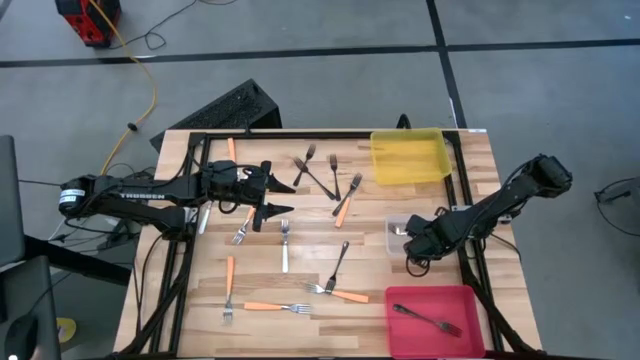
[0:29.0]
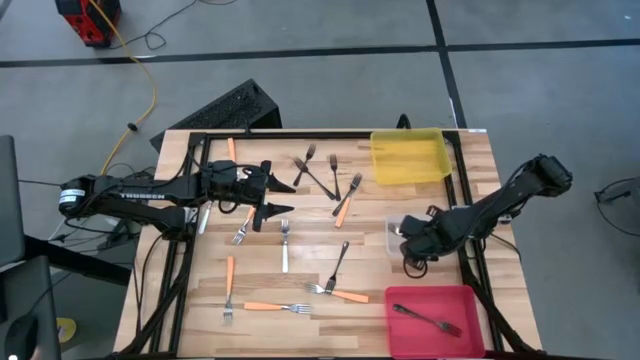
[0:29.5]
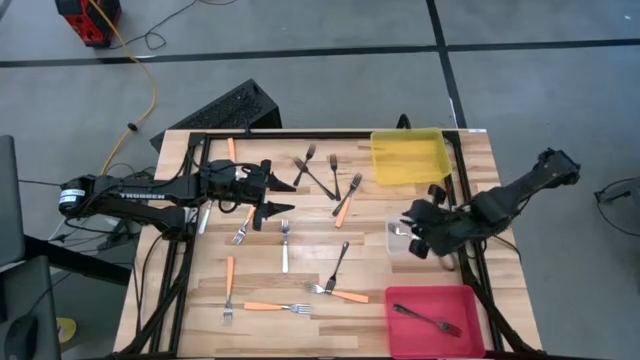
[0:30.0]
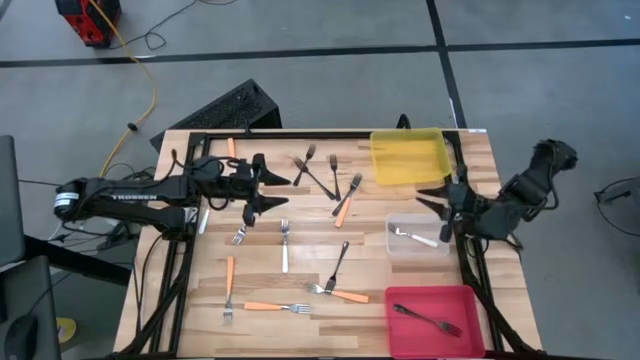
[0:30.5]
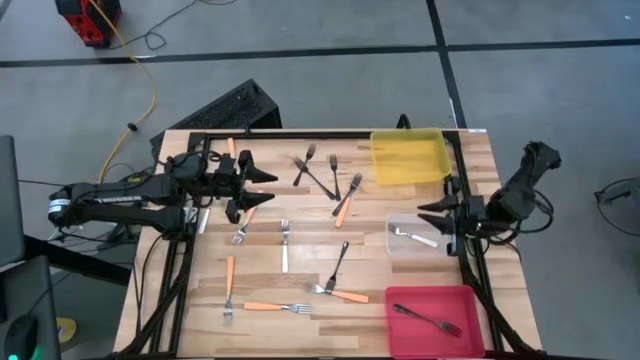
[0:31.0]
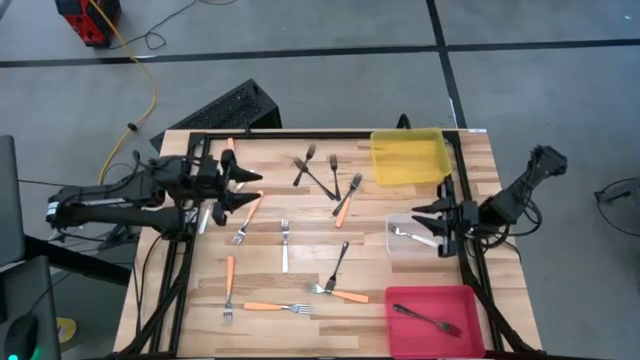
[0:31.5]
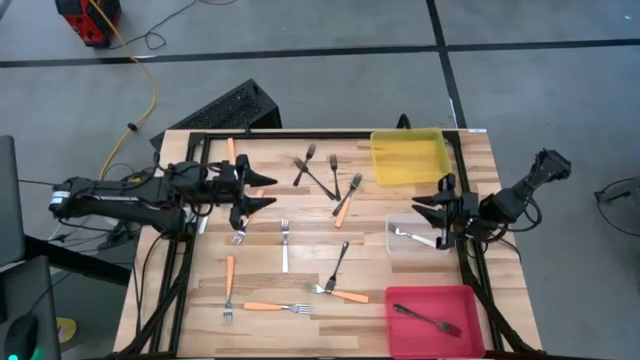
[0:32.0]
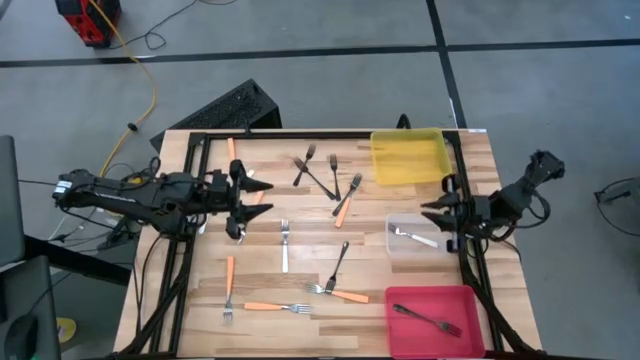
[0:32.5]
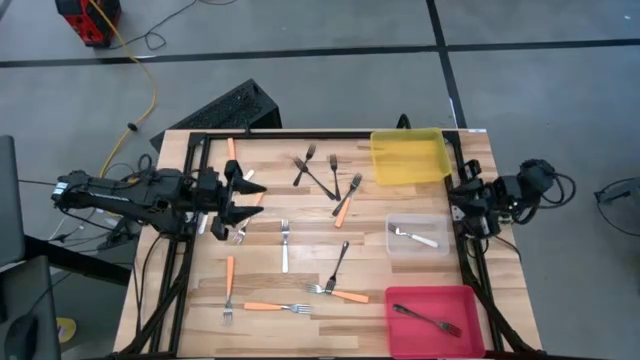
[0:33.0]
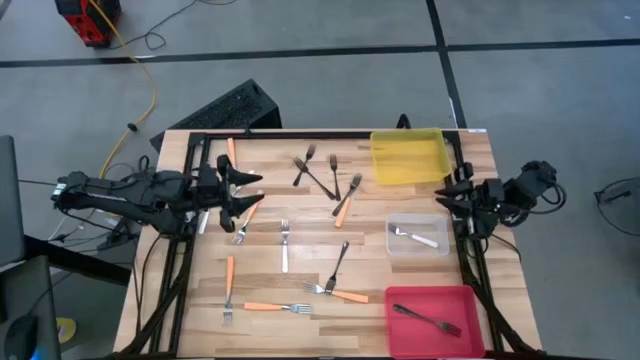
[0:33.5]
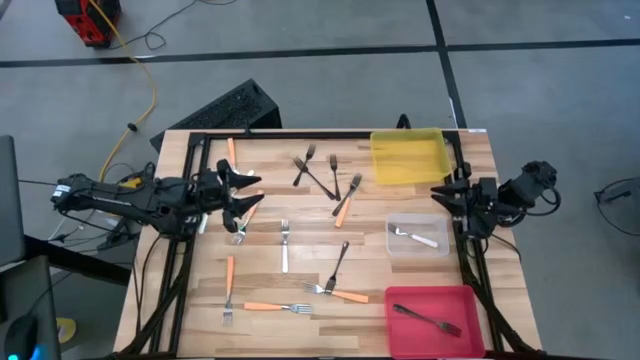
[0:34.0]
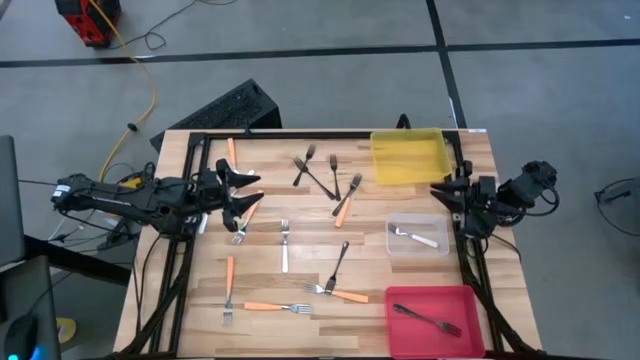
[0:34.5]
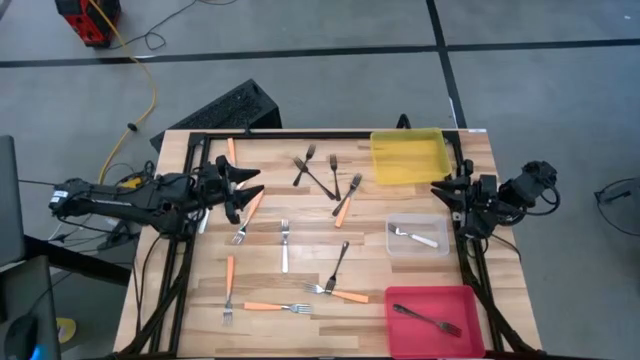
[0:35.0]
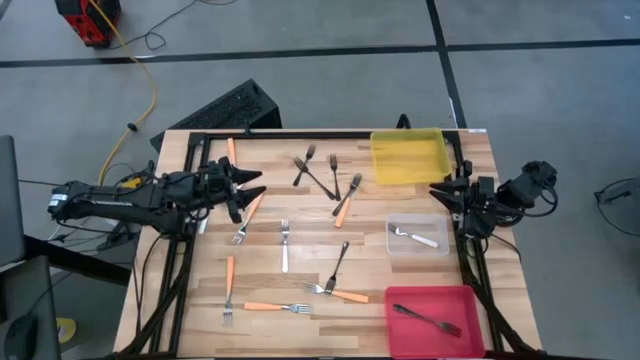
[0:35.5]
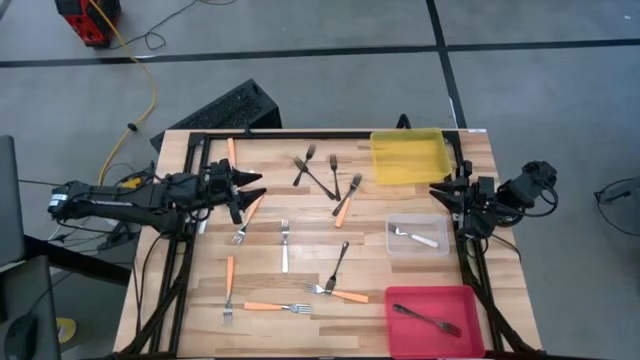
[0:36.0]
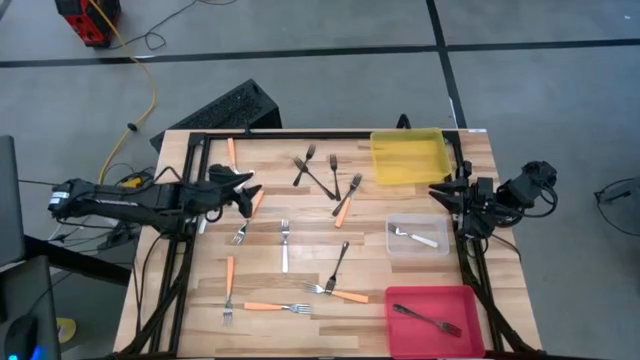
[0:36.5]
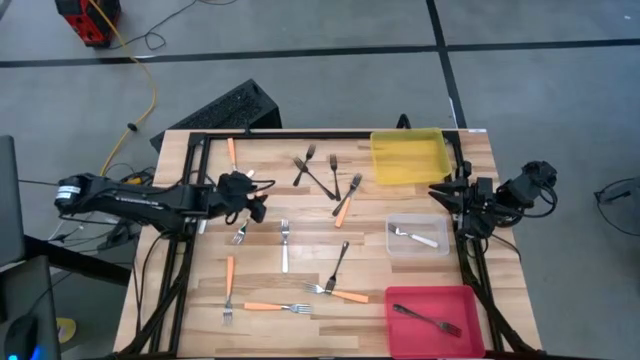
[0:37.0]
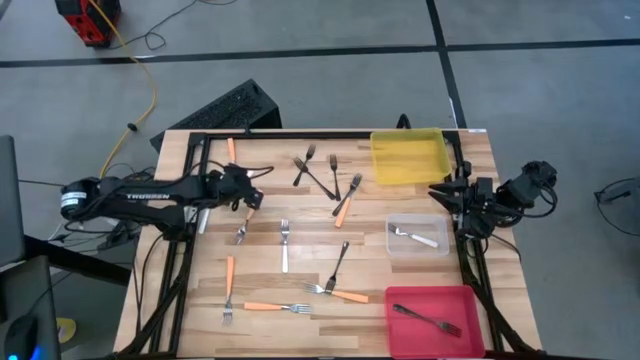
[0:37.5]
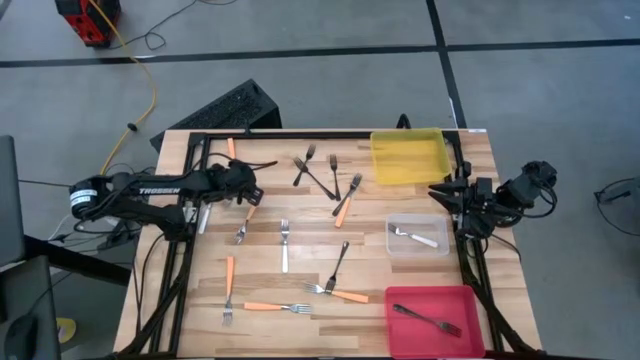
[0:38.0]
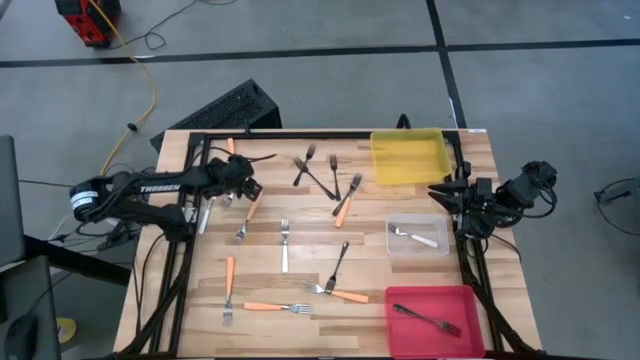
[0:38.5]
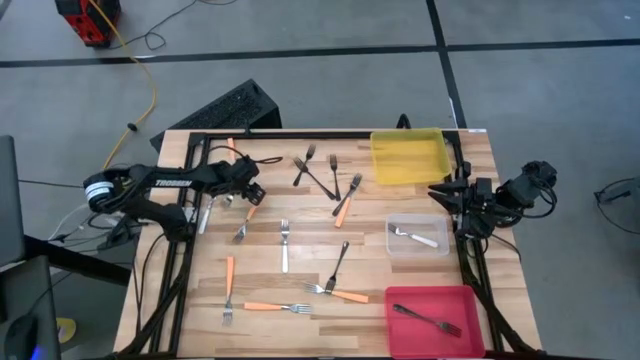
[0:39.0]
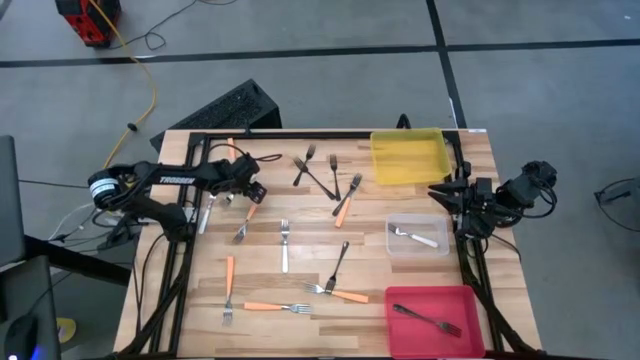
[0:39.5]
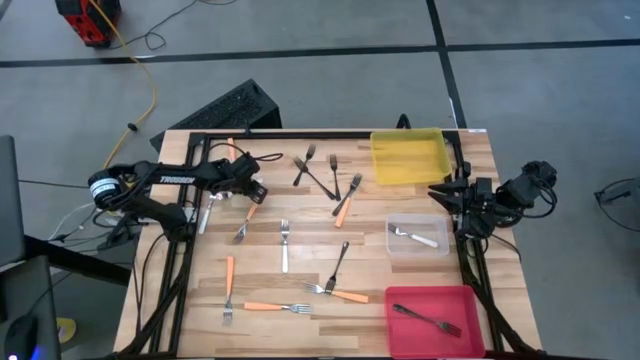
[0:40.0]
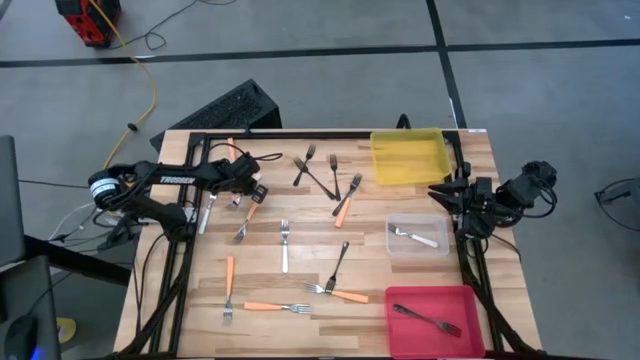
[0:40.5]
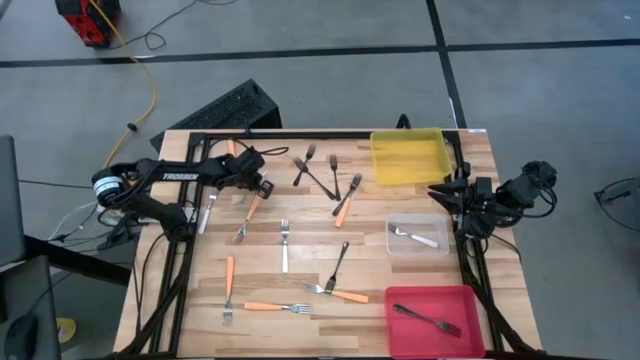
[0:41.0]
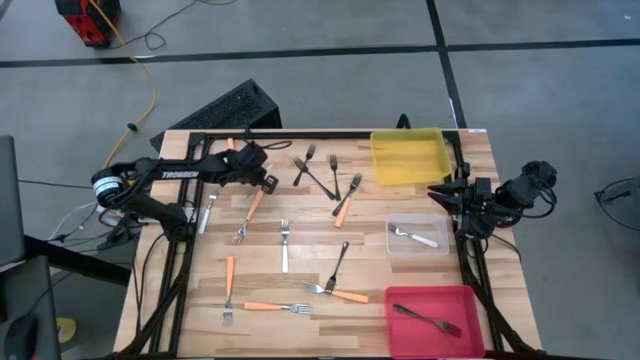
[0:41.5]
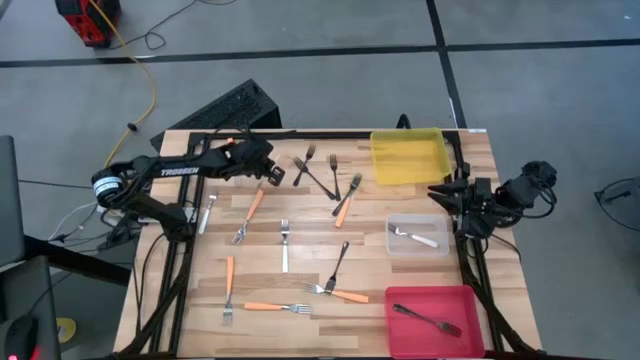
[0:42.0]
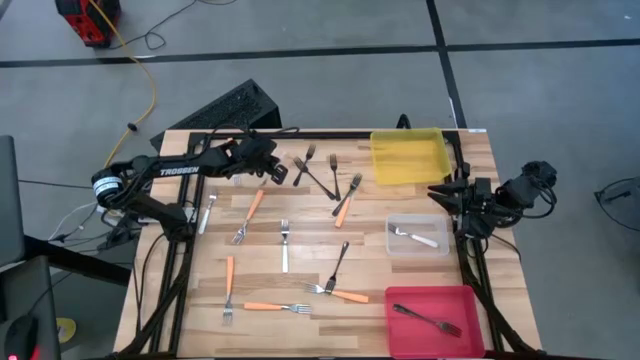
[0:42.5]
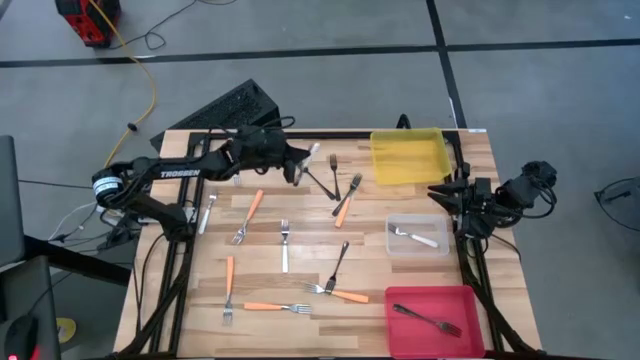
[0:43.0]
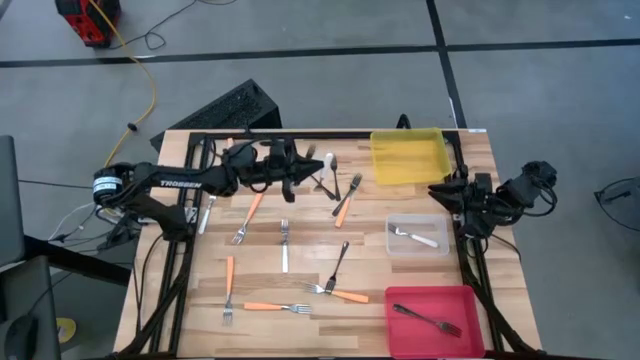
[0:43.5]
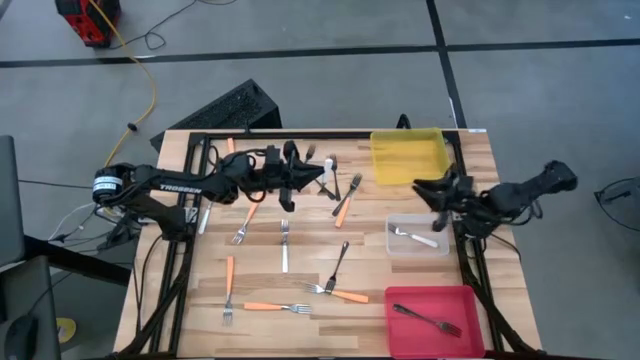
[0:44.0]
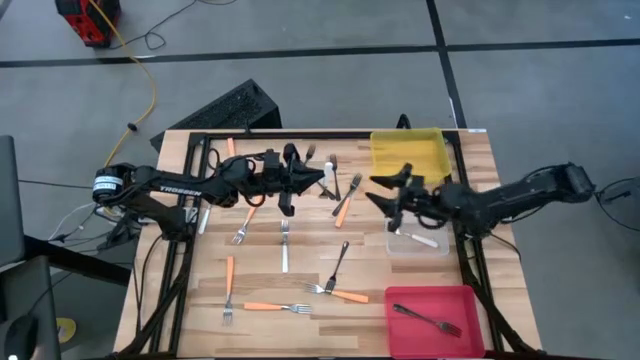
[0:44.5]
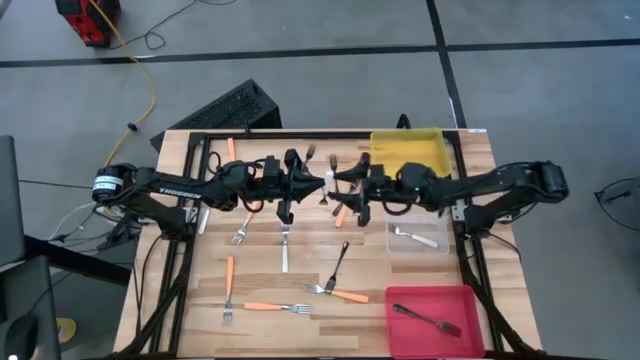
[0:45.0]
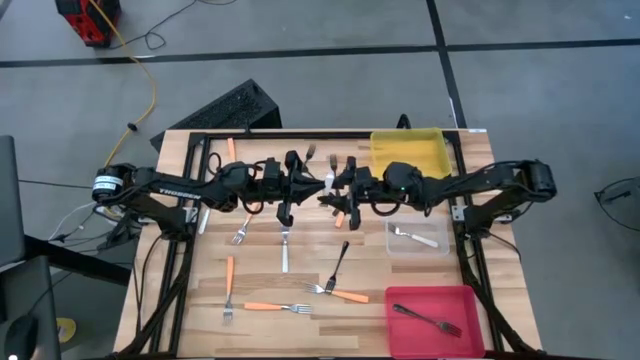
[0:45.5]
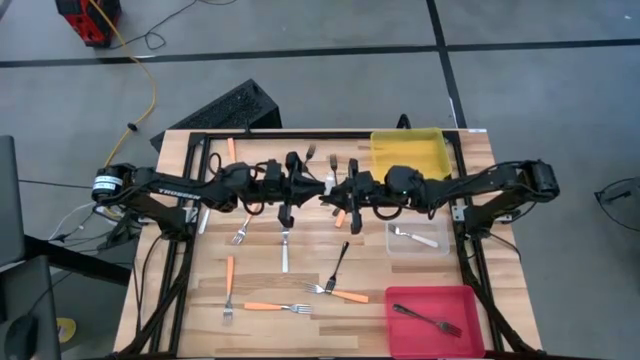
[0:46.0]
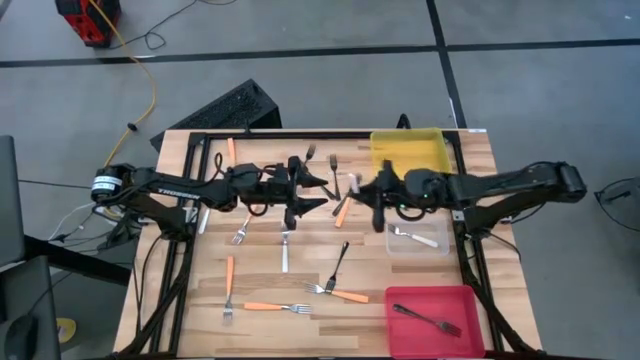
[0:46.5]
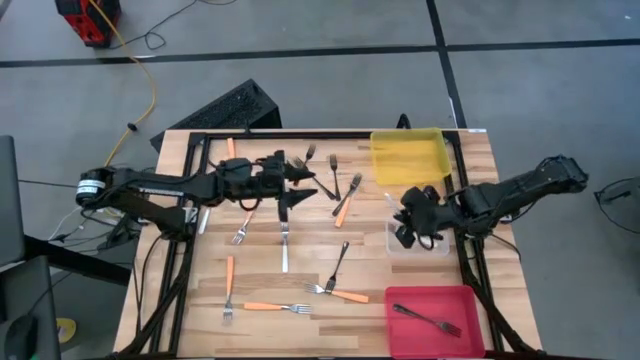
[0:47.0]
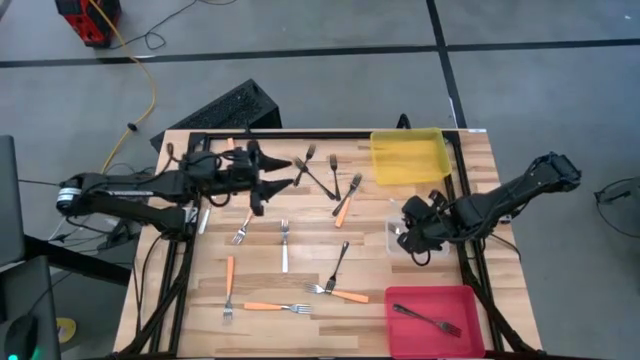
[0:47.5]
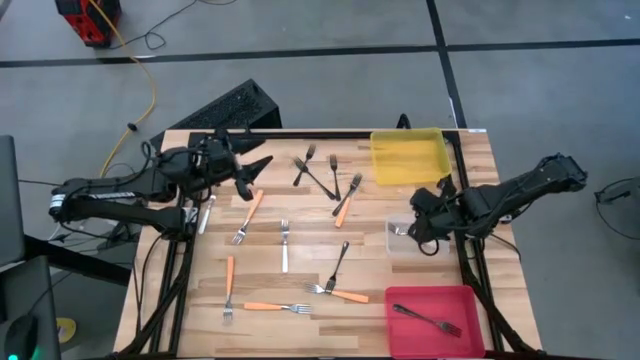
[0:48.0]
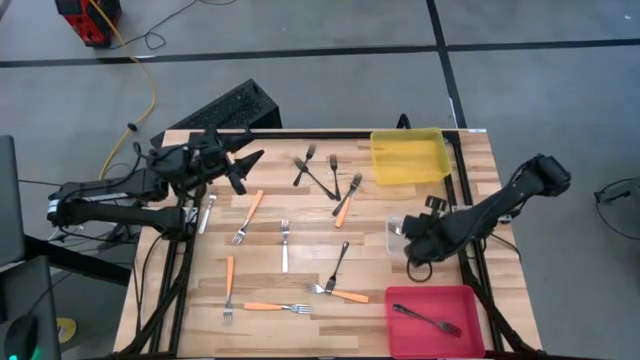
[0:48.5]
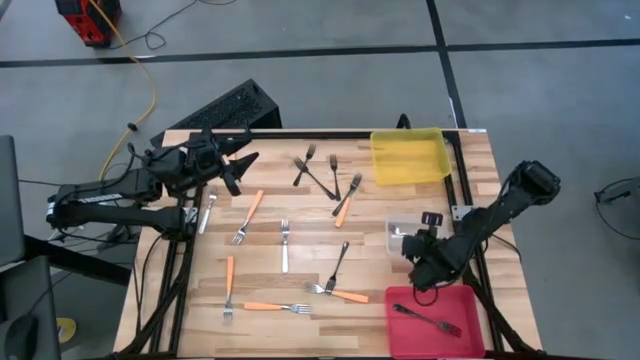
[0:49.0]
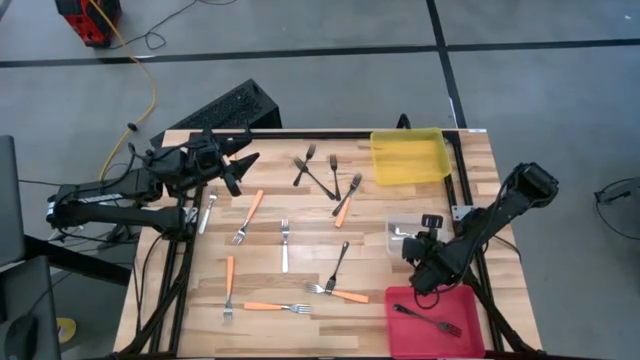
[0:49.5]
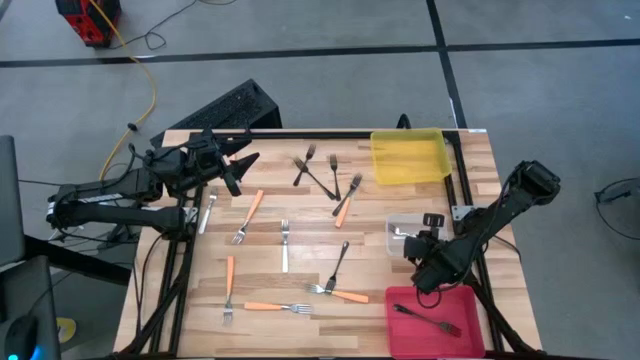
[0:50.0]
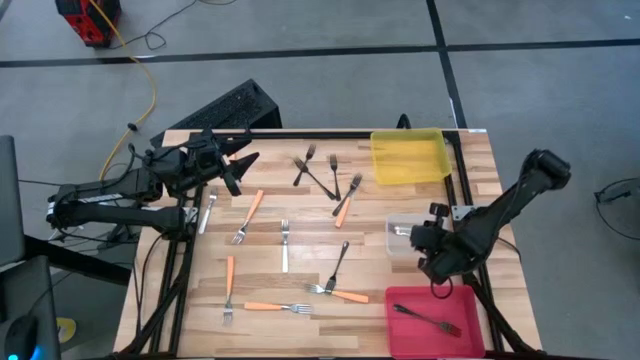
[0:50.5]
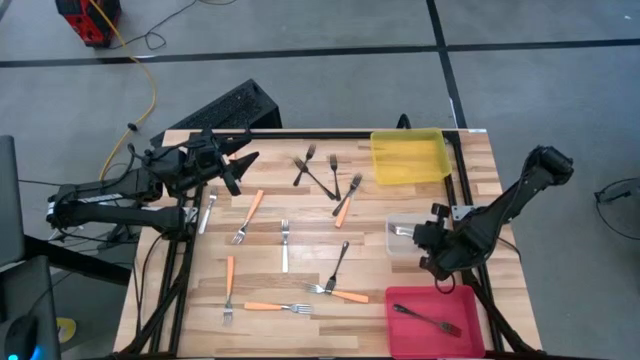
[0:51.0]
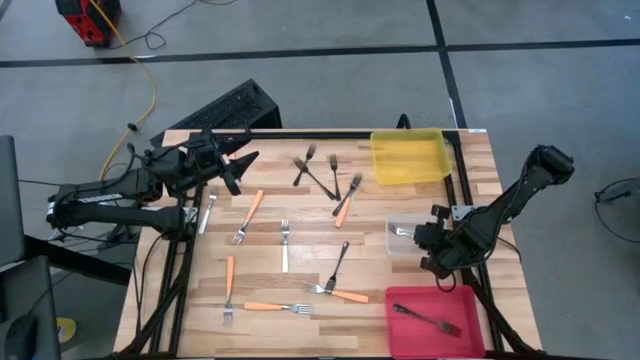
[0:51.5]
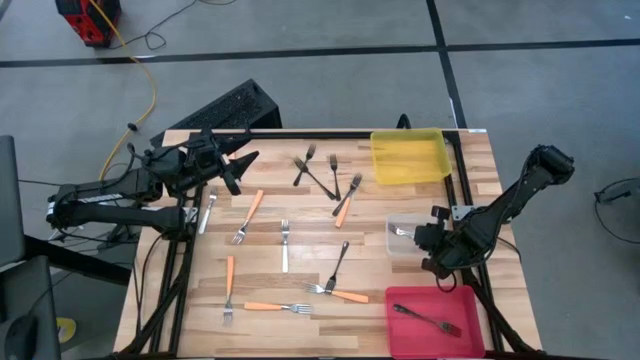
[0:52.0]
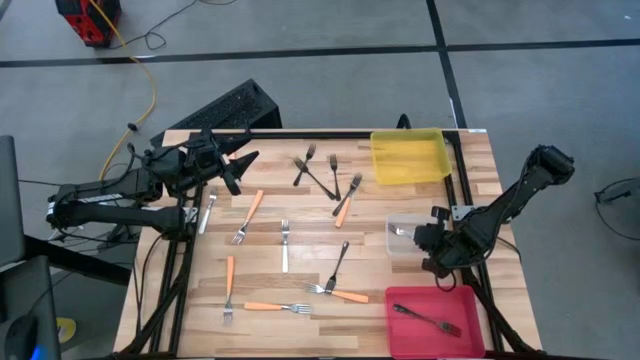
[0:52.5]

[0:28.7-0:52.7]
Task: Sort silverware by color (type)
Put the white fork into the transparent bin
